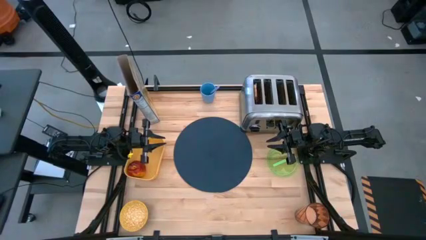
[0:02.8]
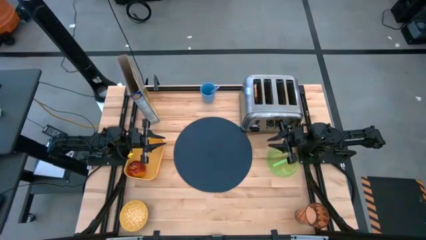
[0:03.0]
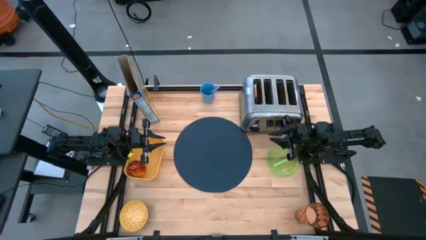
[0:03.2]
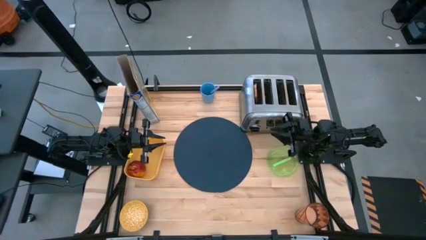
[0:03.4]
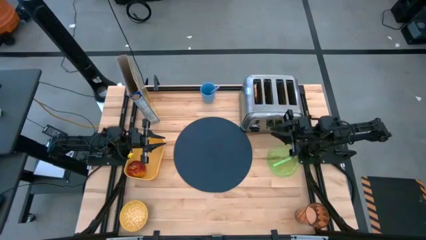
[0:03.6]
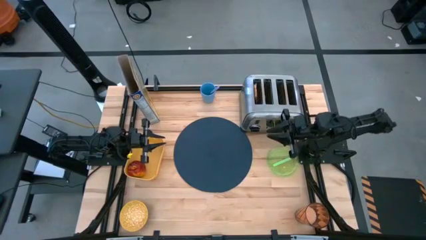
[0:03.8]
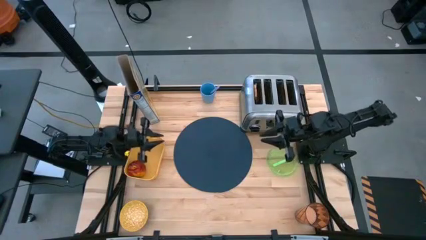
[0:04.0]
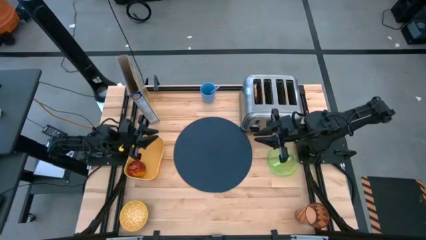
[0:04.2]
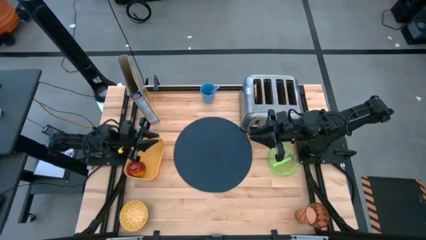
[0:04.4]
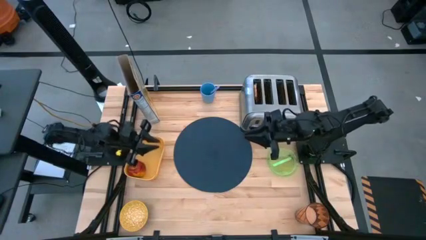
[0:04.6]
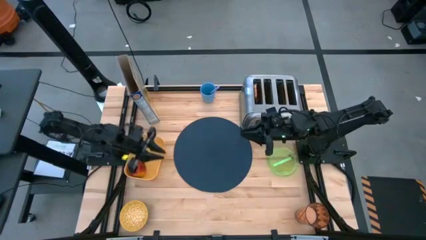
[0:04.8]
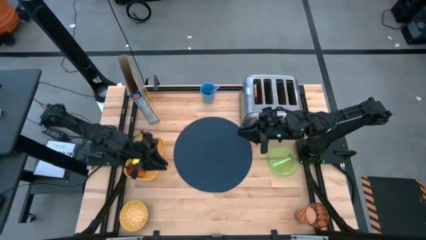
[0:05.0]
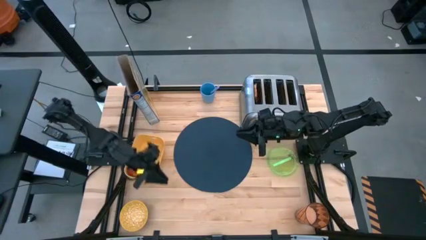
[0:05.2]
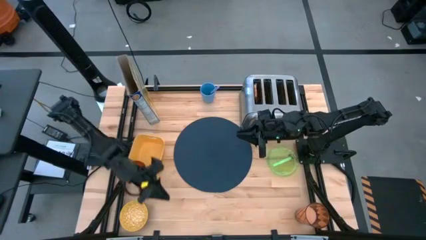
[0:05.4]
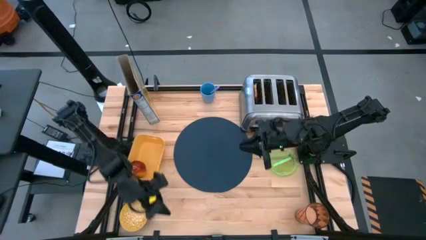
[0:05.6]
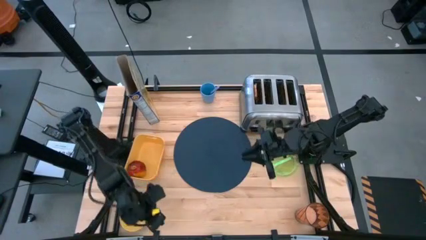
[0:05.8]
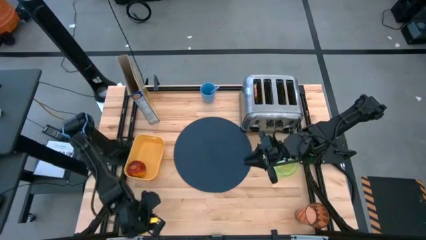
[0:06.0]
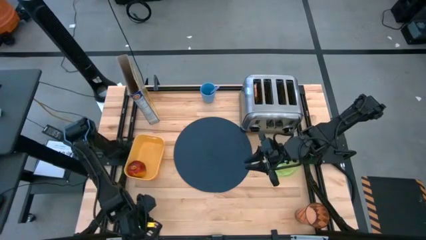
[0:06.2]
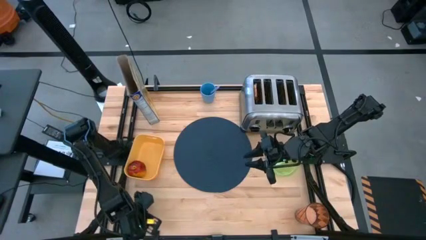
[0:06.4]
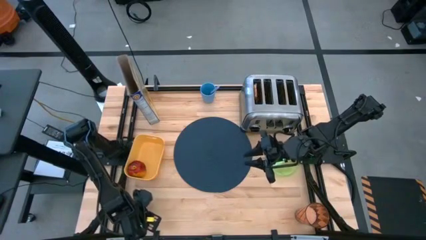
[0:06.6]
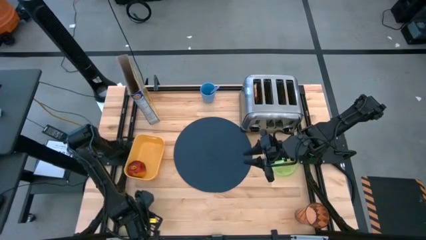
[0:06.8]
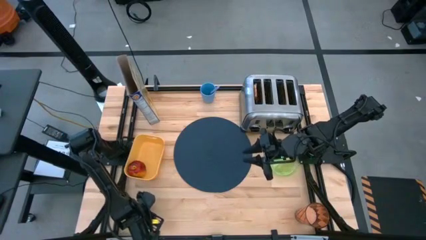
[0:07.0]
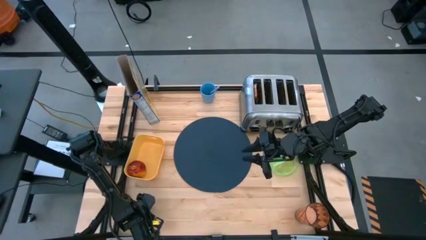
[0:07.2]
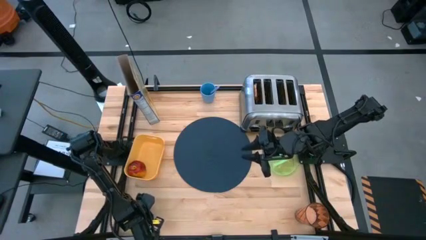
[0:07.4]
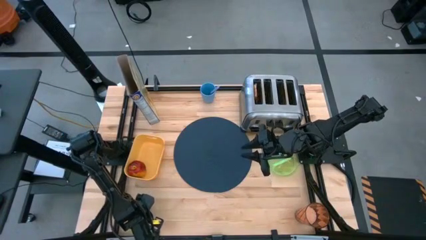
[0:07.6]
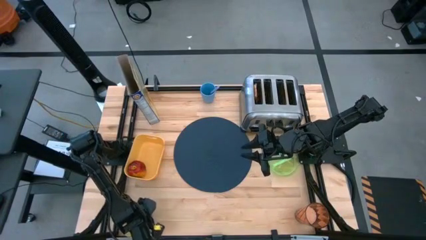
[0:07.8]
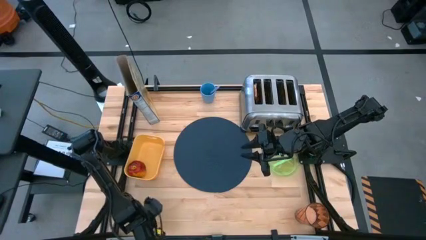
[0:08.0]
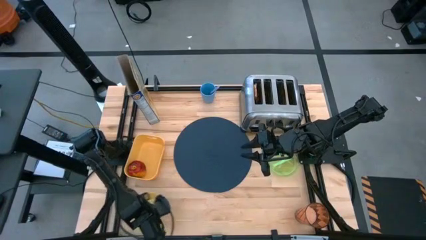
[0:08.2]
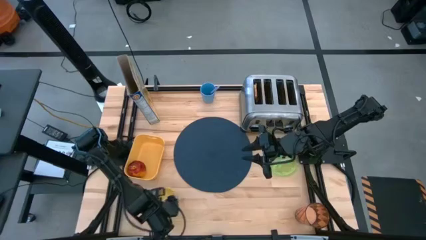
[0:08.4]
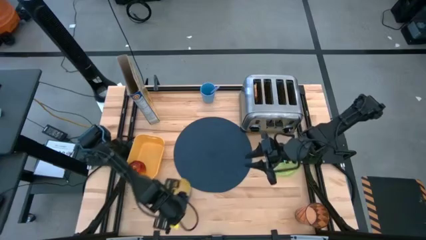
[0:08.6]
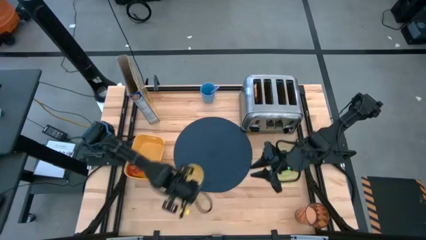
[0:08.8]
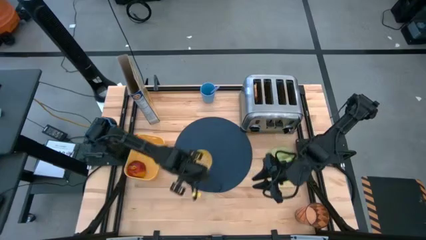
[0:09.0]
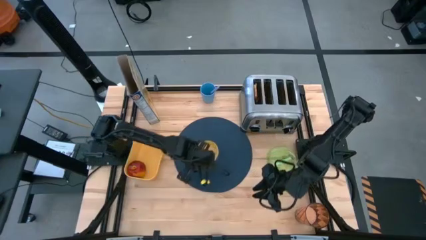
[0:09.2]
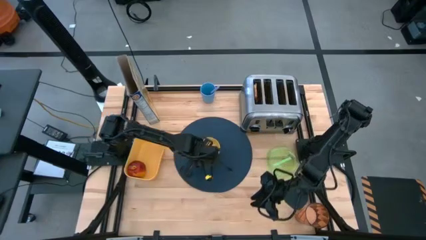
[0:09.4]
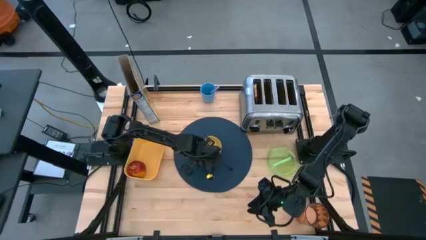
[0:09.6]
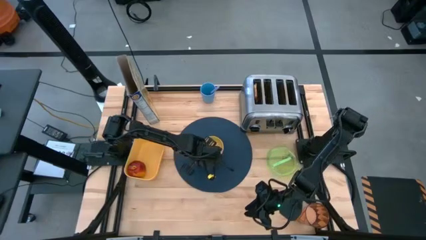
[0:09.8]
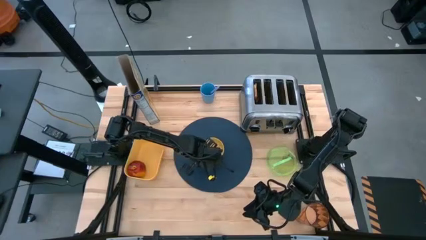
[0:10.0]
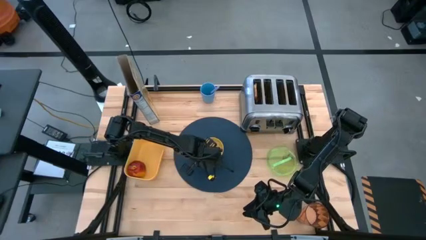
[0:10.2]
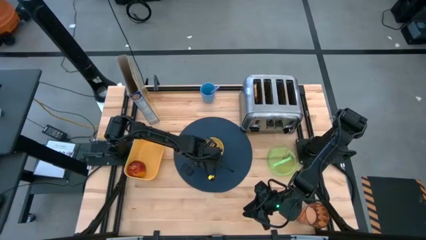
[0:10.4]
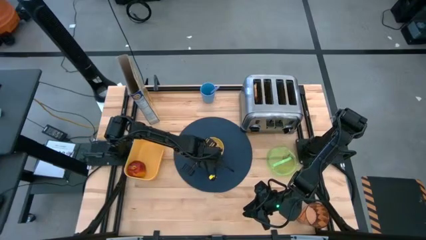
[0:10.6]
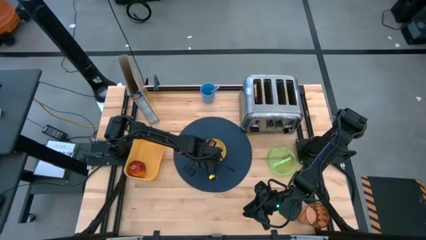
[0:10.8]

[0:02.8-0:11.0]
Task: Arrange a breakfast setting
Put the bowl on top of the mat

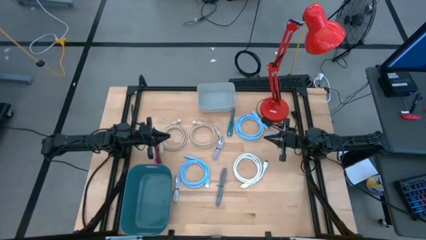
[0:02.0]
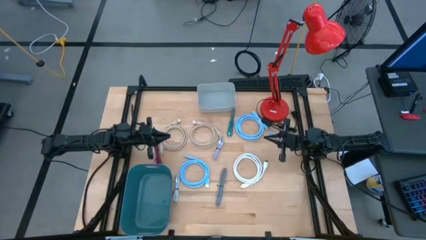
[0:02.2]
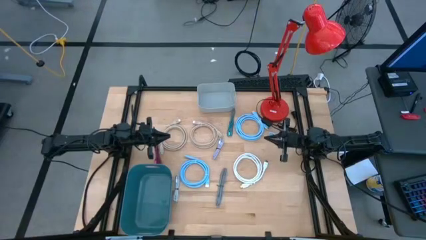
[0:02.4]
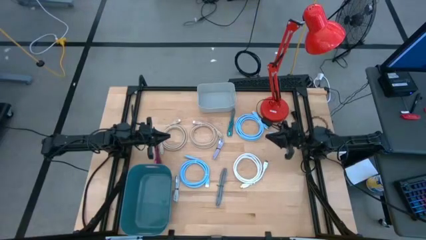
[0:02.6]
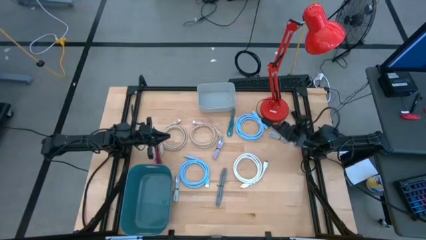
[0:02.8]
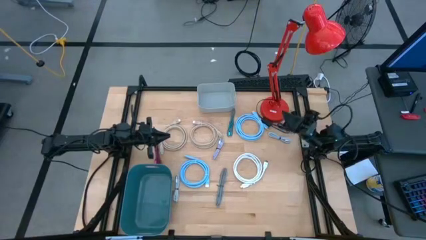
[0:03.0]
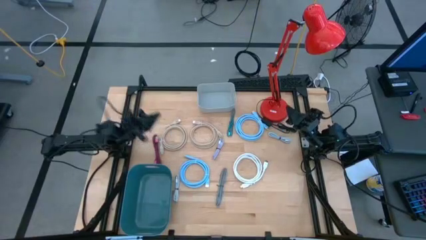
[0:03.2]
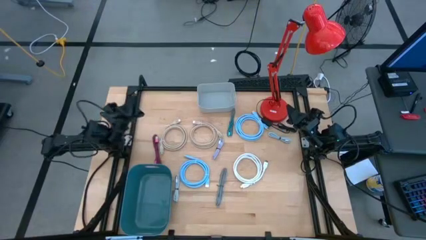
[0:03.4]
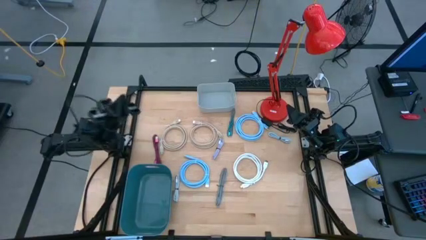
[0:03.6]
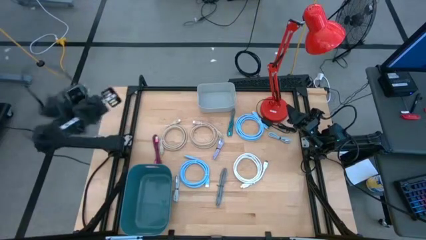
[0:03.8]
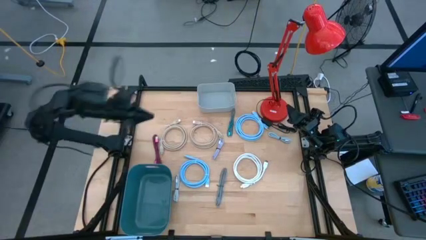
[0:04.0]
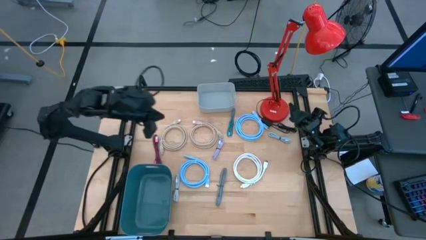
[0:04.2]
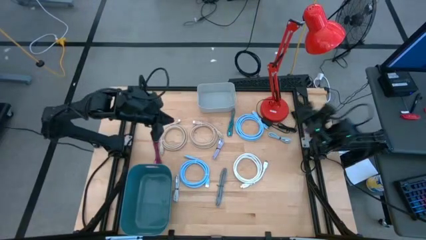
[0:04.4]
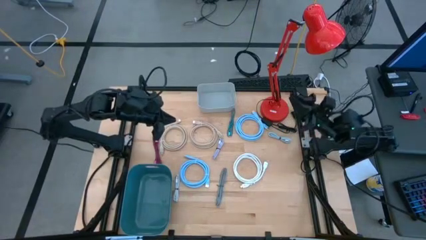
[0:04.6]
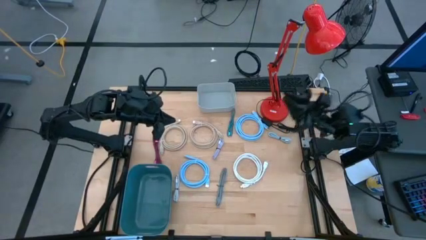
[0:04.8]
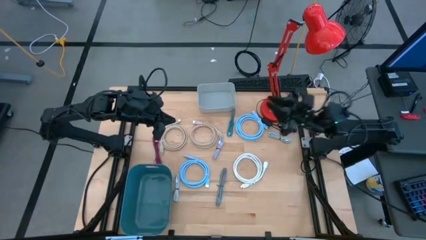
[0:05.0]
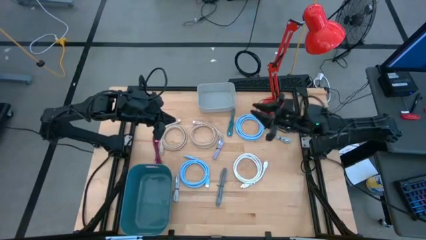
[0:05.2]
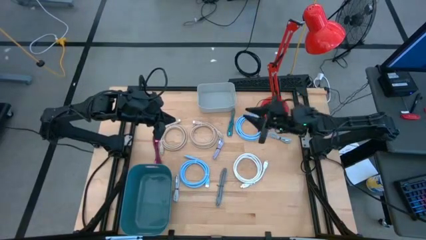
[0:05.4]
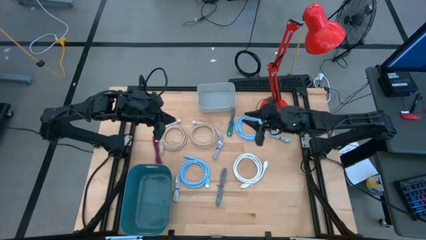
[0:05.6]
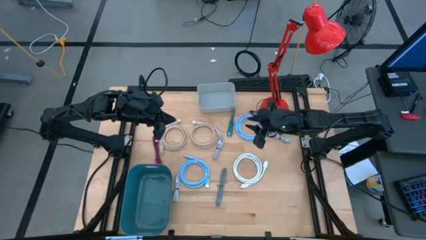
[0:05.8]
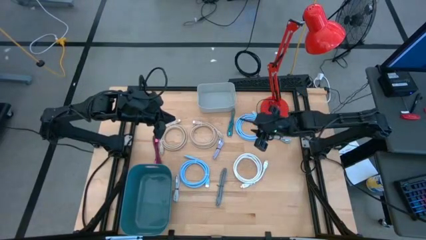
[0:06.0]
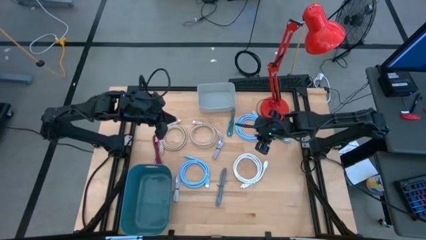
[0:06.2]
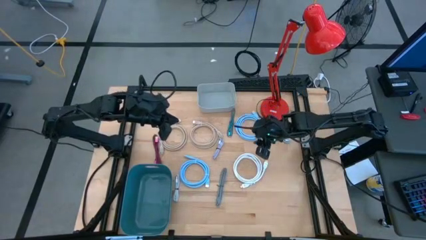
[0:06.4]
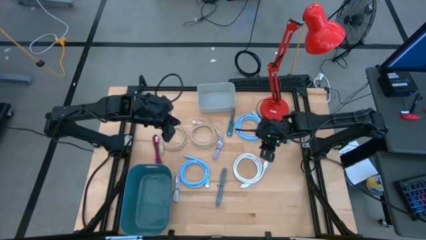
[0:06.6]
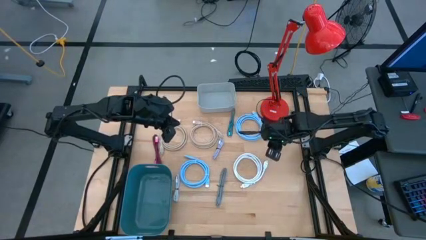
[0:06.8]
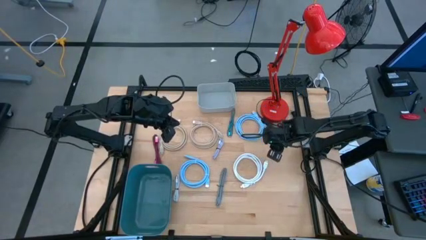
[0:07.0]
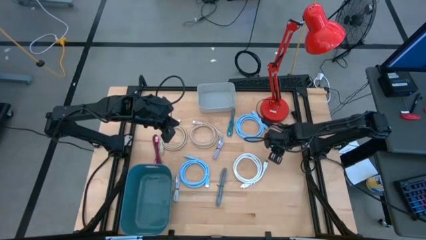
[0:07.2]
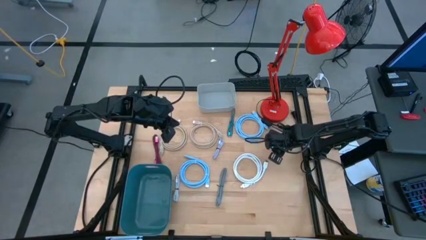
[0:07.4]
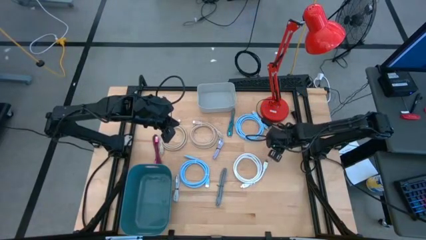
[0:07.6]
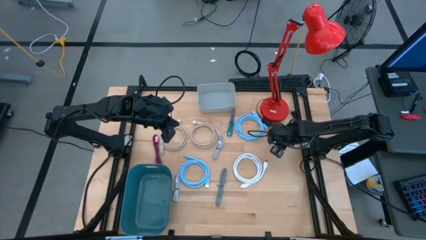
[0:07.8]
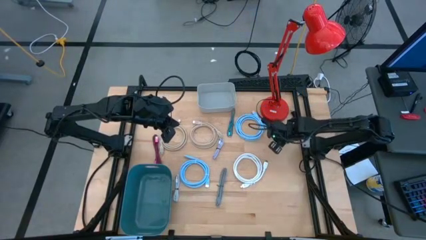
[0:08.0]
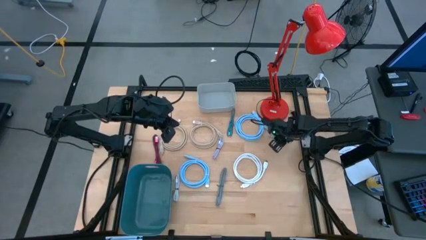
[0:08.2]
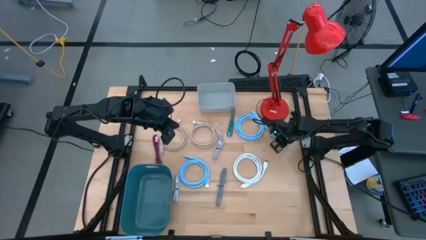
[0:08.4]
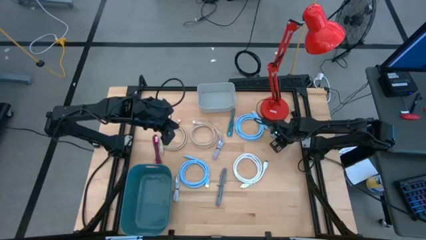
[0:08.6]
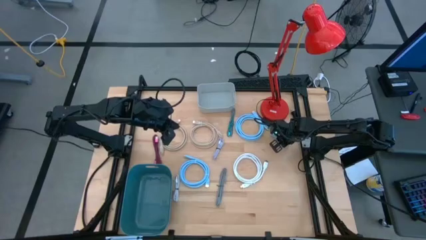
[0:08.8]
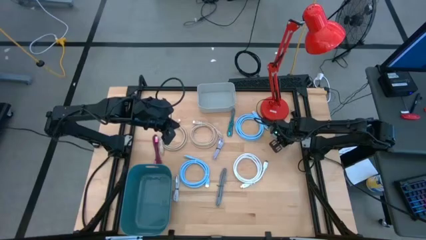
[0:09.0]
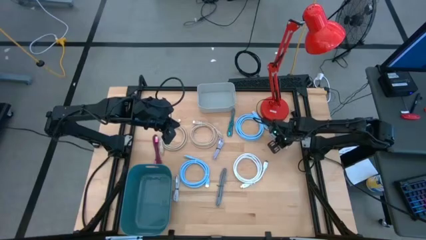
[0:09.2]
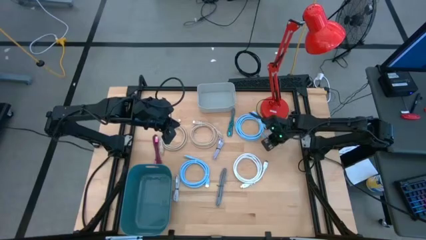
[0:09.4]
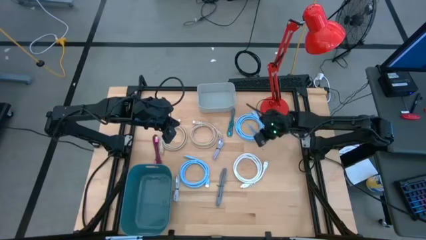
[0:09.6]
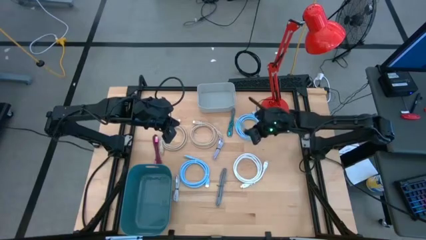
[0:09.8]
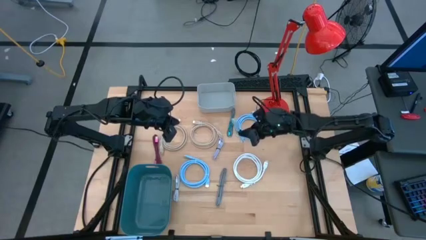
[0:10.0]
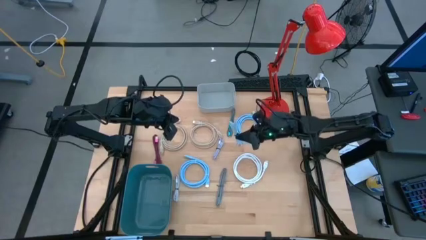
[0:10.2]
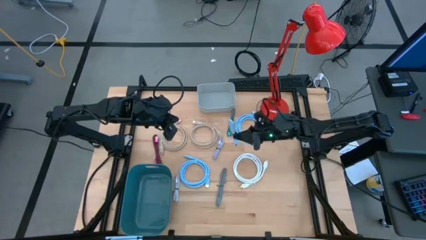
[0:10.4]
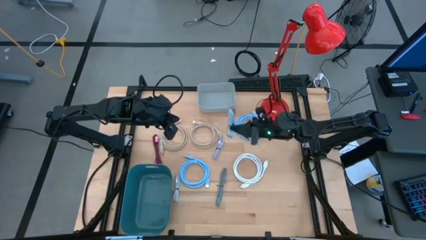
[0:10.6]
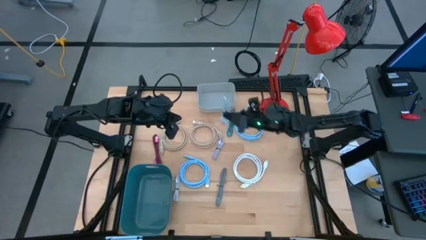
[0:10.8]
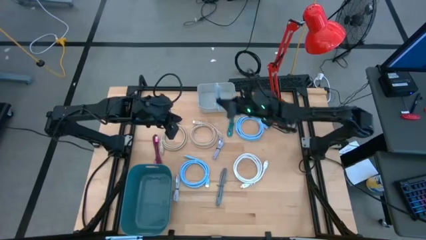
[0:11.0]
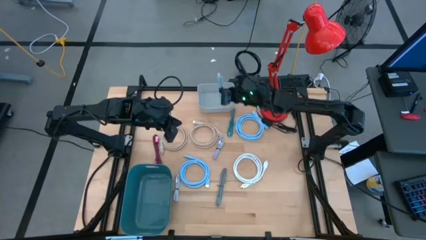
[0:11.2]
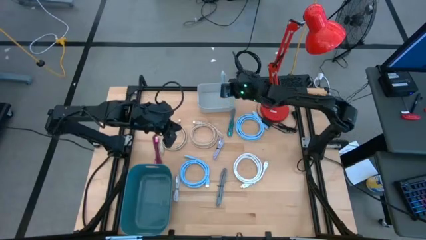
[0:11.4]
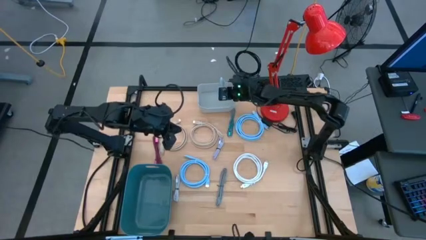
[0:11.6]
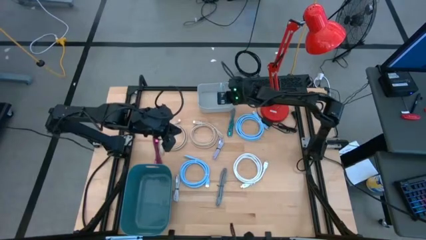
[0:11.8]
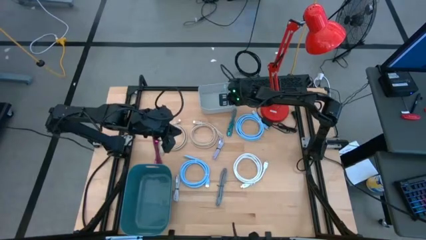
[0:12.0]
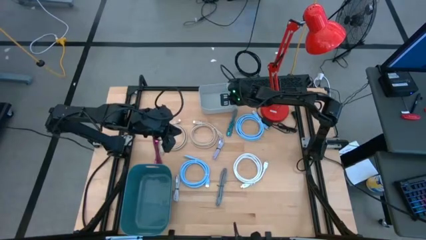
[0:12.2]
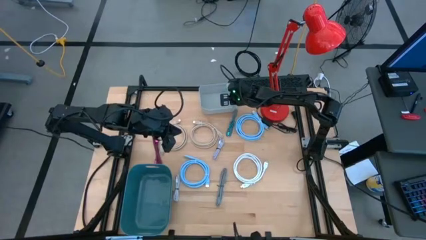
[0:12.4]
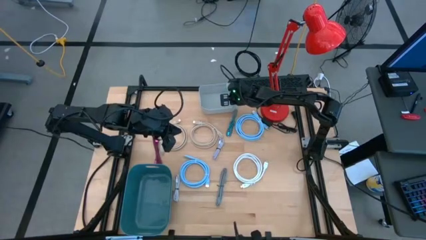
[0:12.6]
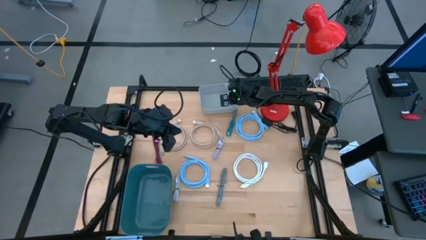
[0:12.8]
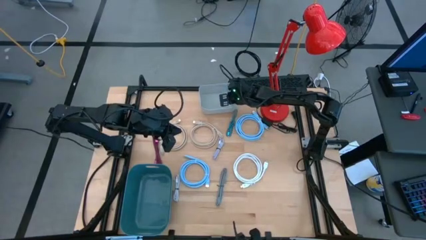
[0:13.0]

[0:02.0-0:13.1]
Task: Pick & Place USB Port
Put the light blue charger cable into the gray bin
